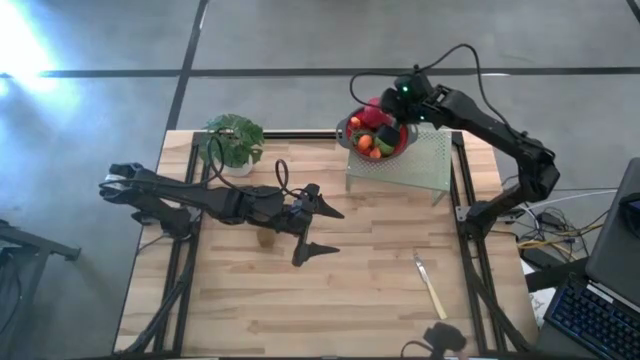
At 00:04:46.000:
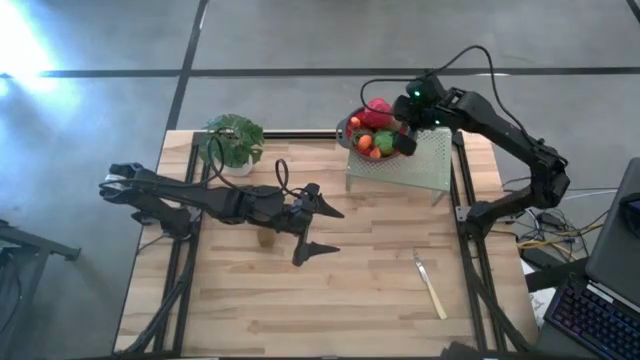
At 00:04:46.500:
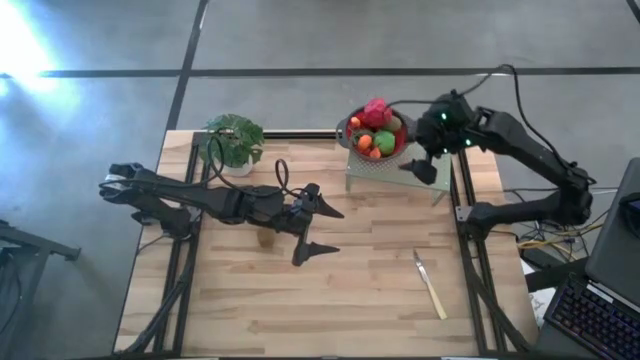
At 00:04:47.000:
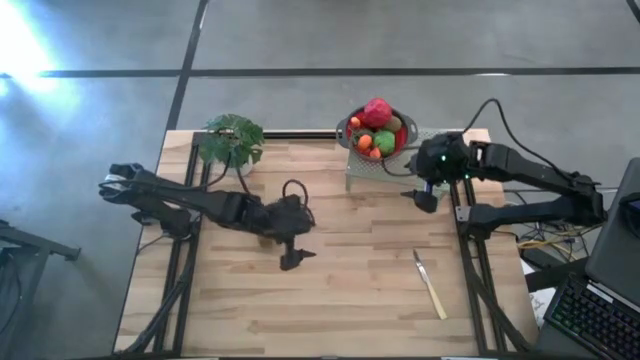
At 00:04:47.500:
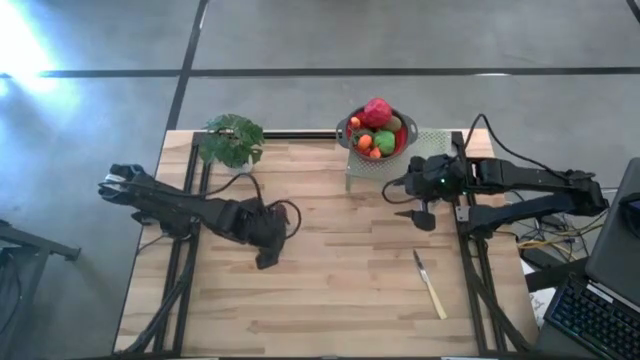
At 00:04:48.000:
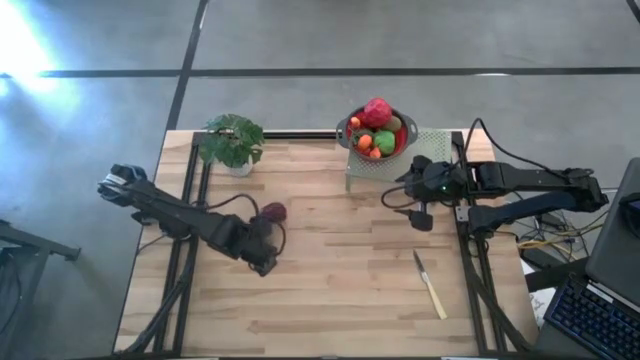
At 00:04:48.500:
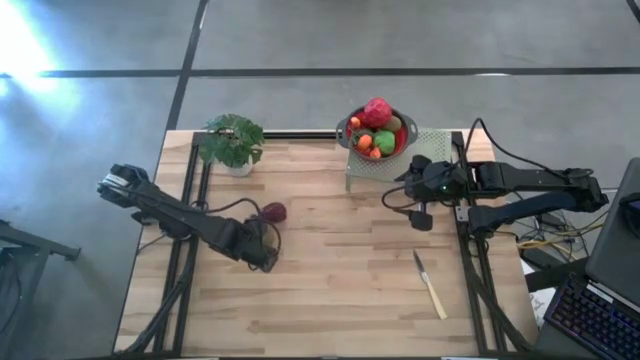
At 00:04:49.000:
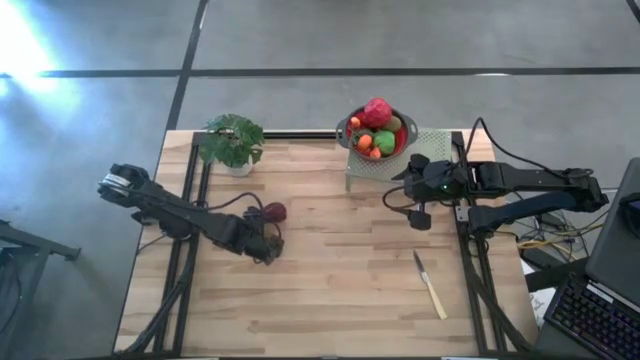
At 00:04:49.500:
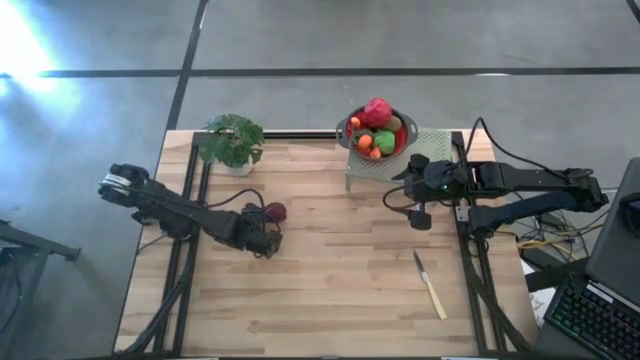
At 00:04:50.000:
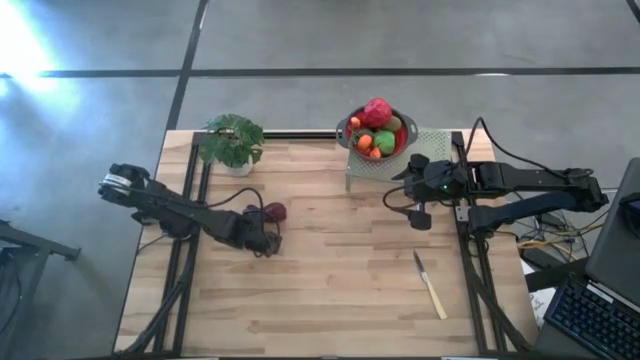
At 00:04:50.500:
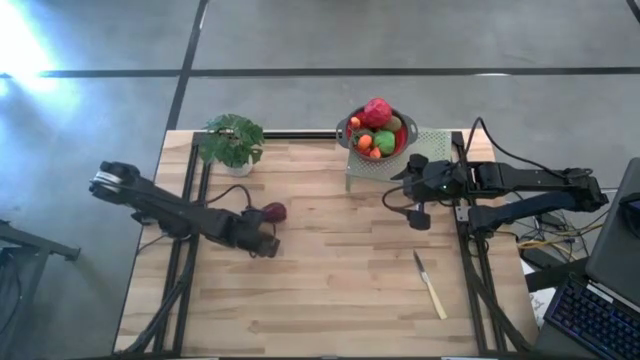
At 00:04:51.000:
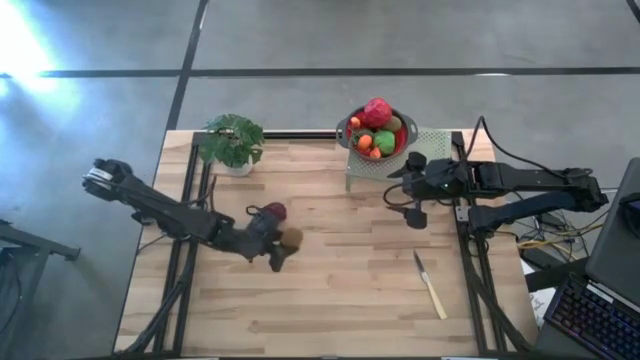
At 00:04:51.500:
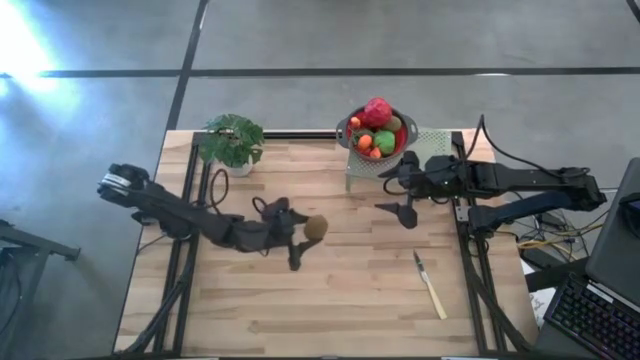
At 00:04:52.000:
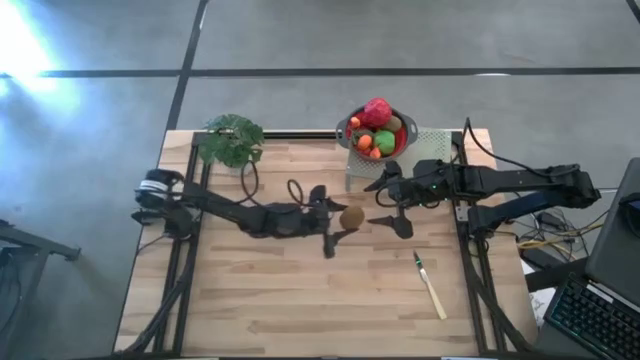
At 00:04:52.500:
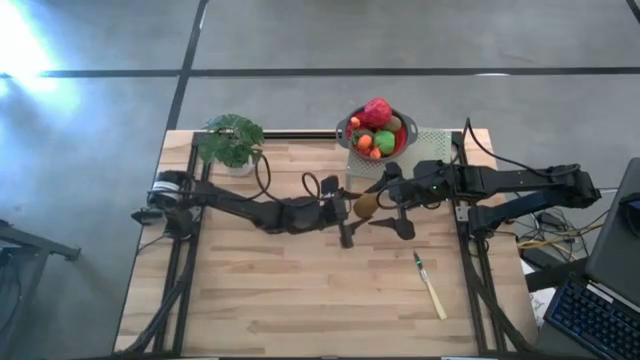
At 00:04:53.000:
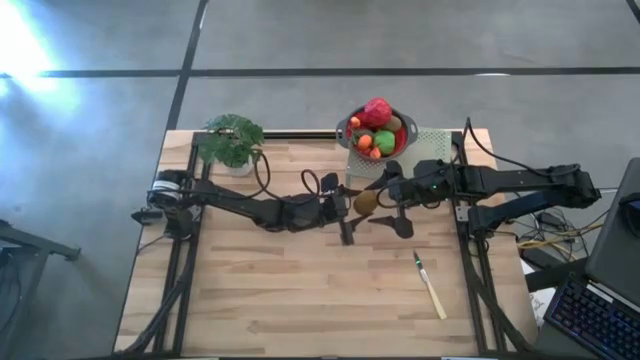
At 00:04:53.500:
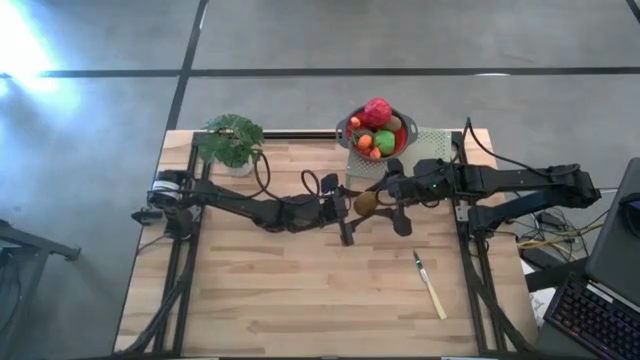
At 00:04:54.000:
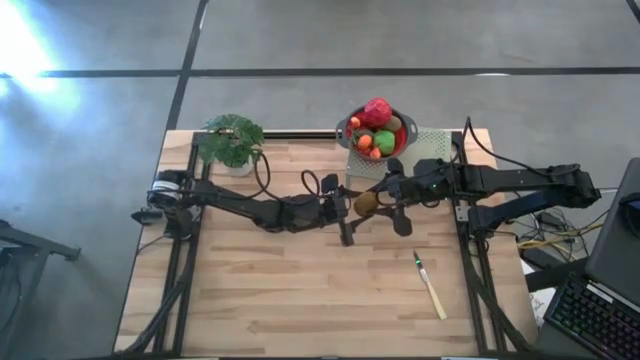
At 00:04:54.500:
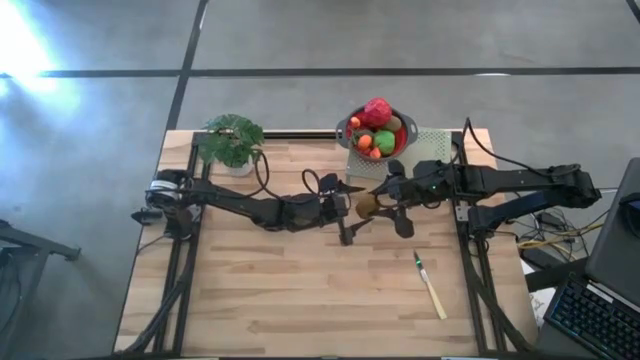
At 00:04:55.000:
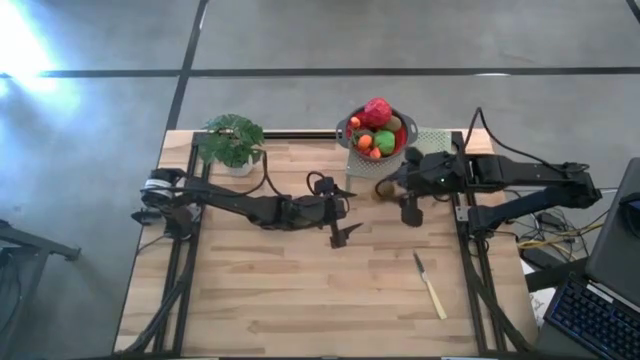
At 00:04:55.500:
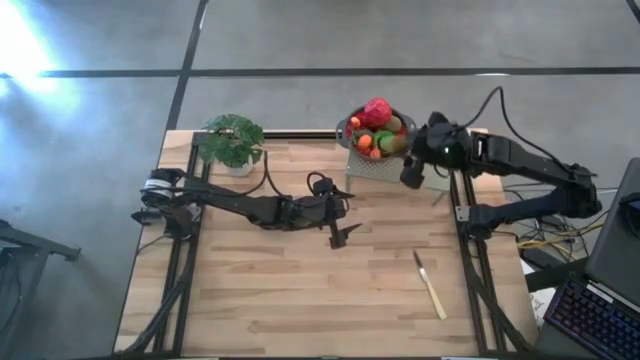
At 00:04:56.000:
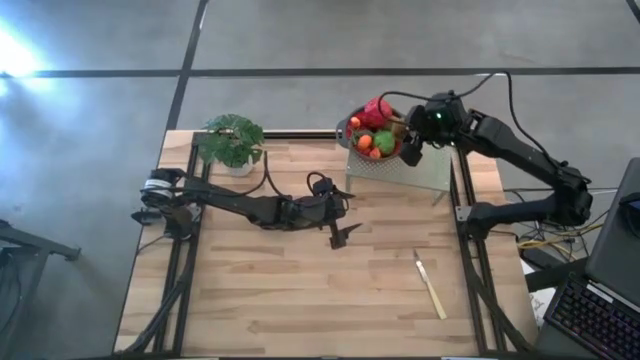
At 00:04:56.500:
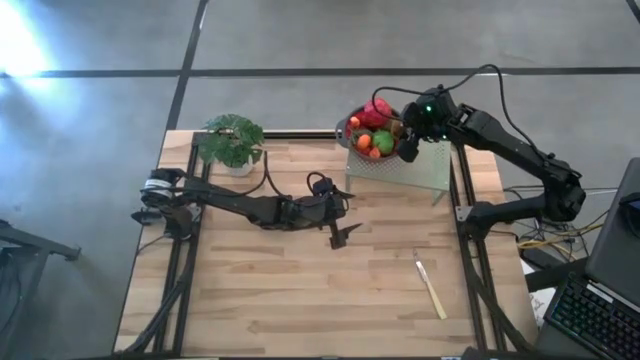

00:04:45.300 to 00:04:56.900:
Task: Pick & Place Fruit
Put the kiwi into the strainer bowl on the shelf

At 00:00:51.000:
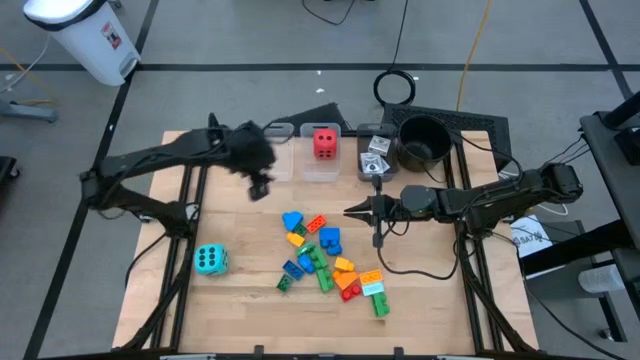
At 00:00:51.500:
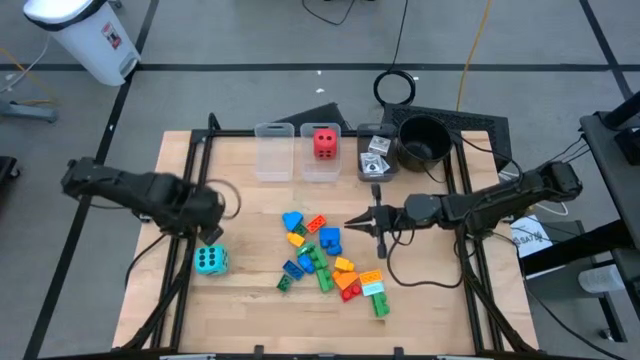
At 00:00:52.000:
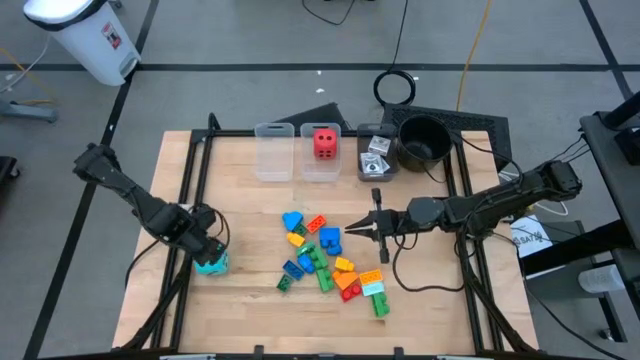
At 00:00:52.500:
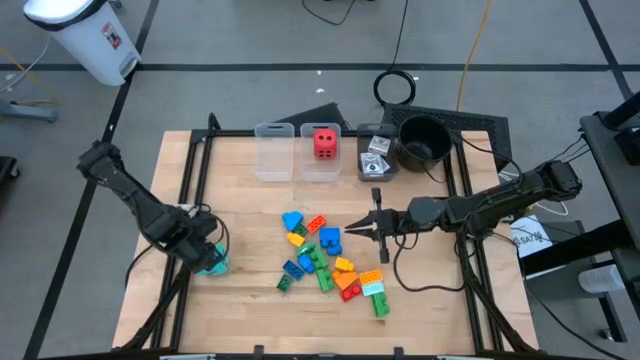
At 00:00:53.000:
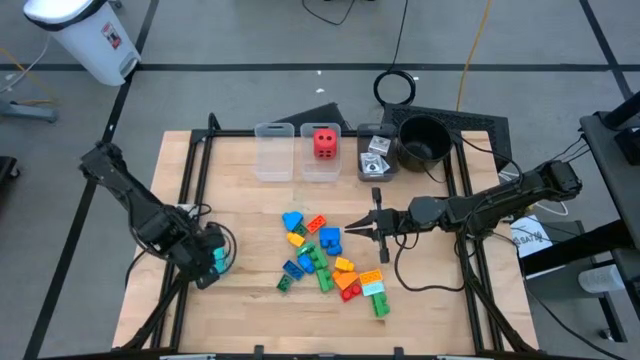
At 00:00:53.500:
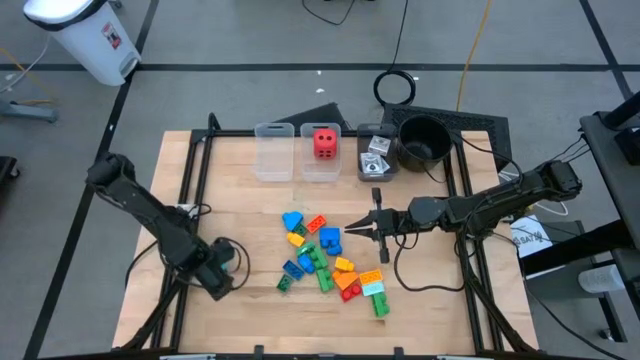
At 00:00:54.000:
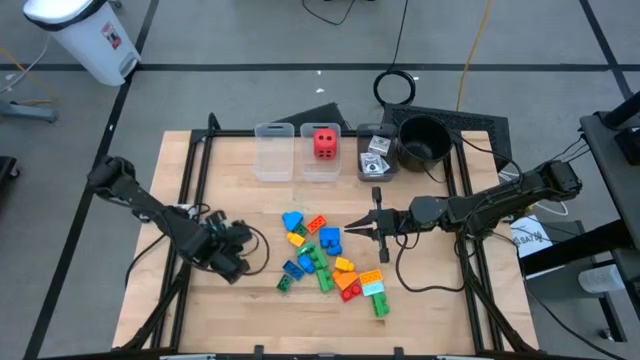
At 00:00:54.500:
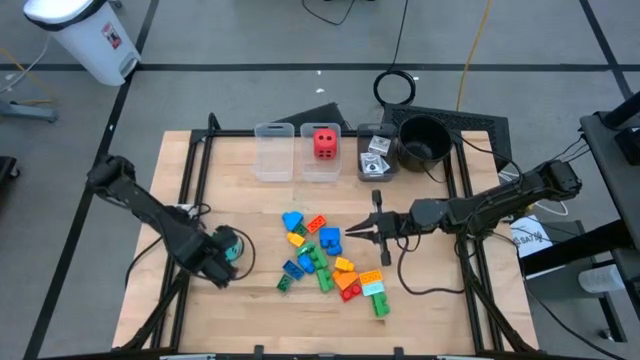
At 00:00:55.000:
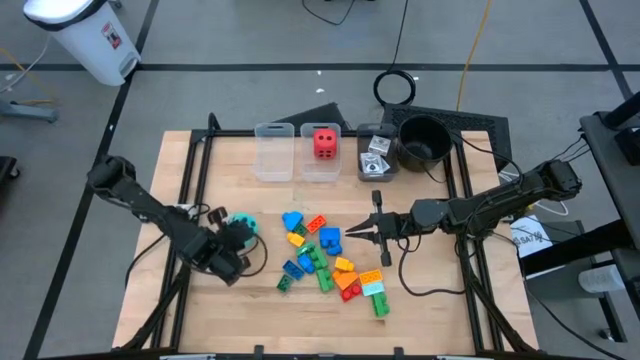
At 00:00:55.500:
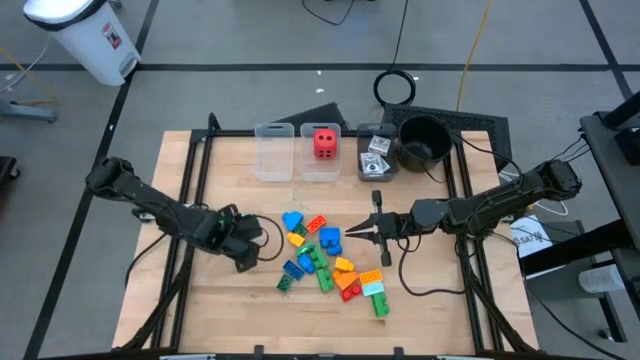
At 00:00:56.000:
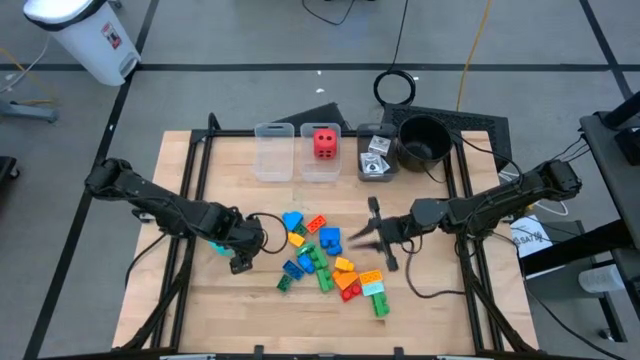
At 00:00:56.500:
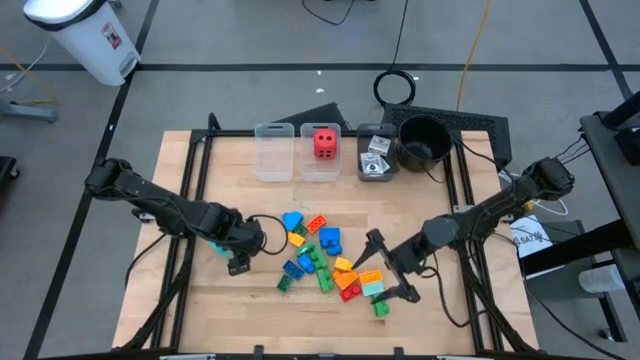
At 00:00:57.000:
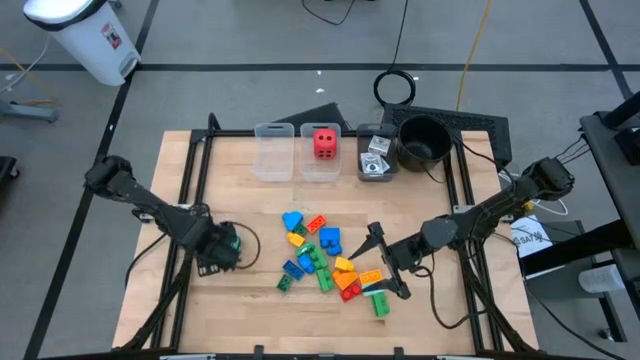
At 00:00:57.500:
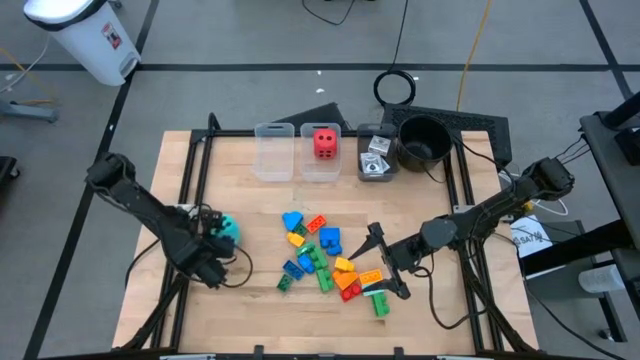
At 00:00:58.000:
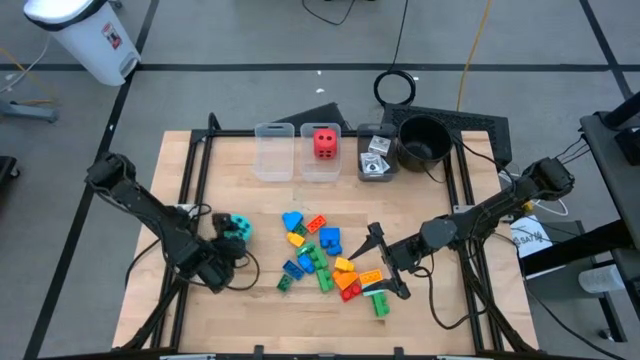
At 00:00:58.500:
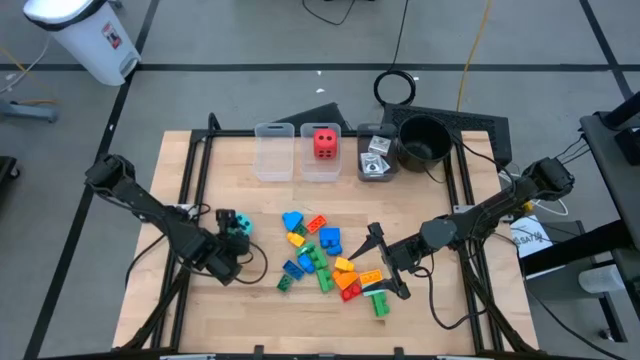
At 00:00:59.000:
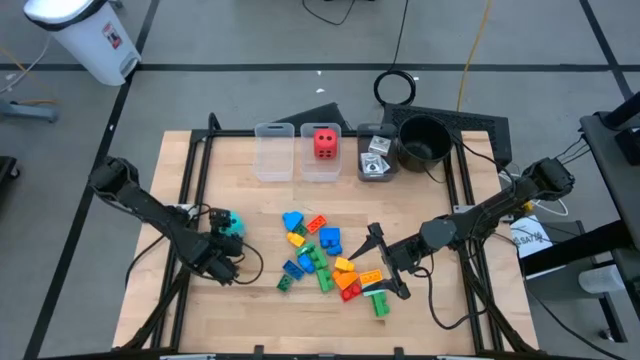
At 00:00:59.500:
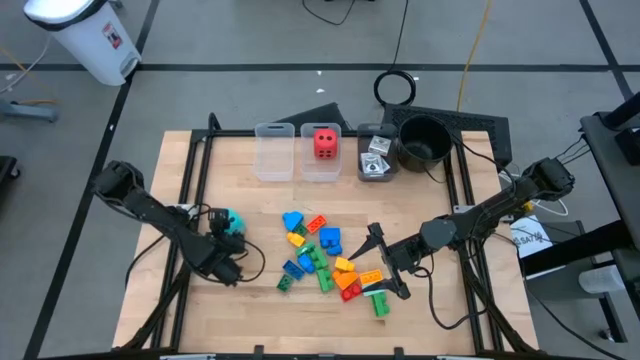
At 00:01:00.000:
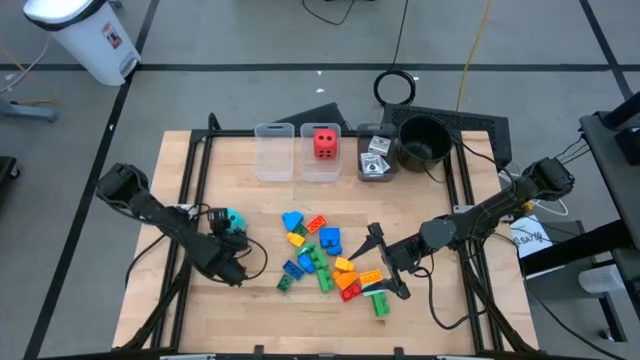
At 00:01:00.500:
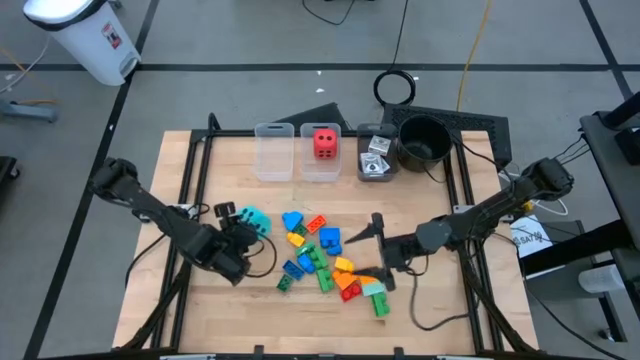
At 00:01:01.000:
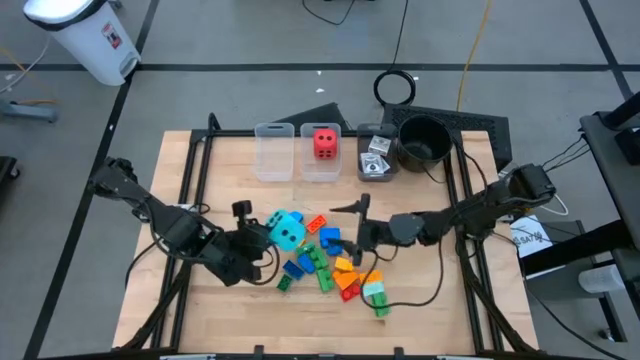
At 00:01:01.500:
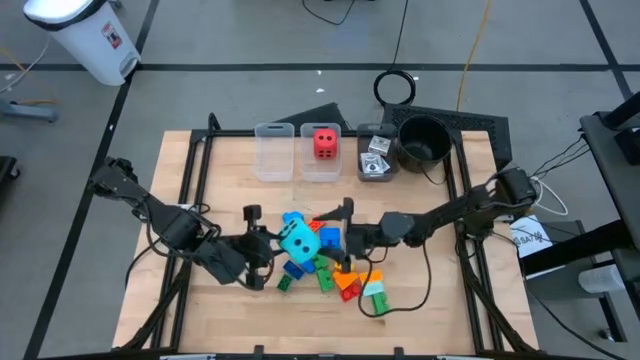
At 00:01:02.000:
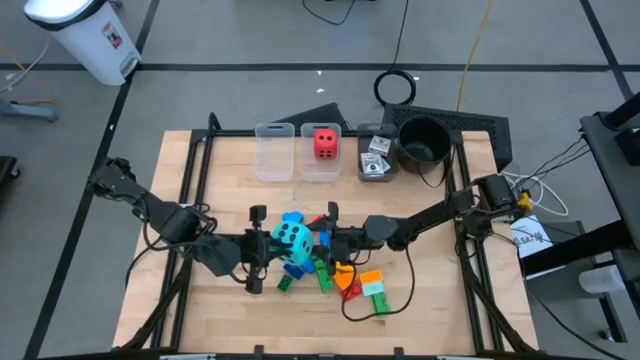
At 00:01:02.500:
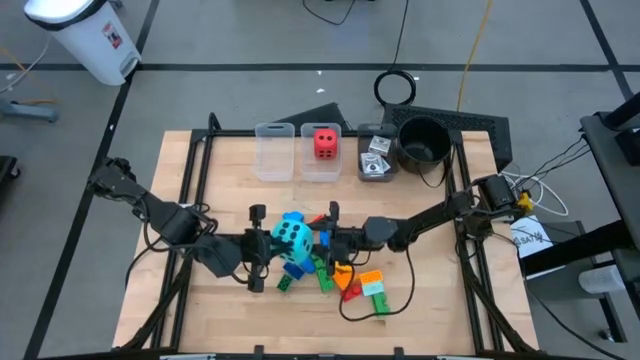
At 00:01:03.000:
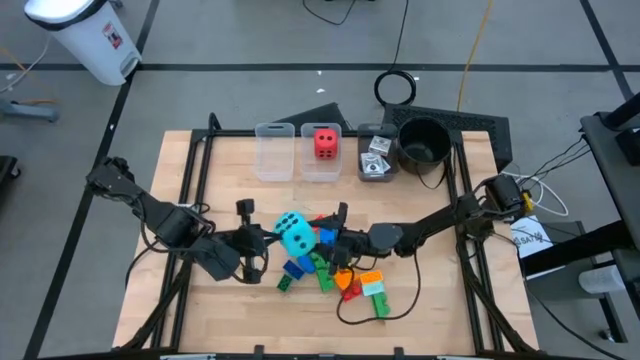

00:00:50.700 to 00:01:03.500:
Task: Pick & Place Toys
Put the blue dice into the right transparent bin
